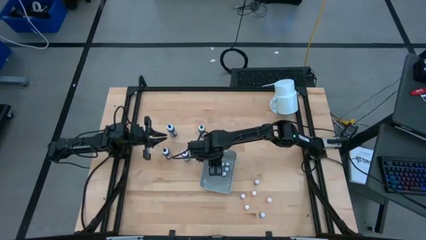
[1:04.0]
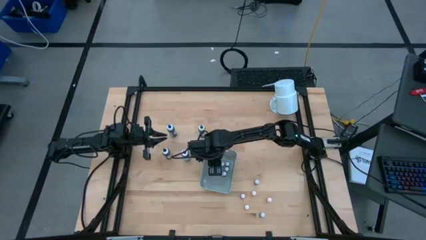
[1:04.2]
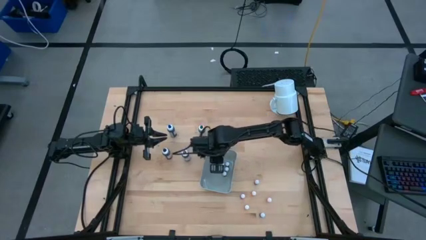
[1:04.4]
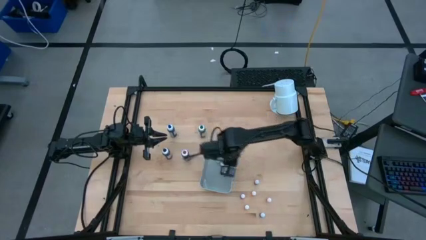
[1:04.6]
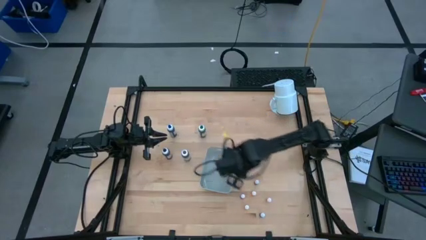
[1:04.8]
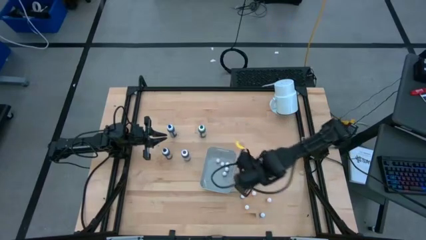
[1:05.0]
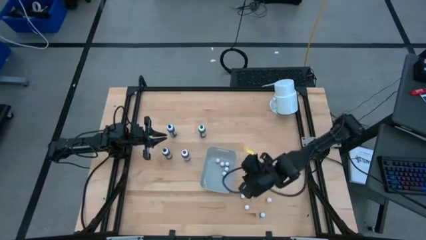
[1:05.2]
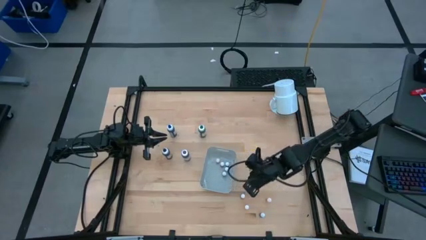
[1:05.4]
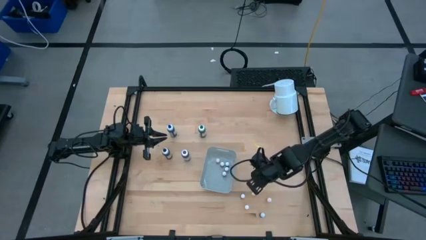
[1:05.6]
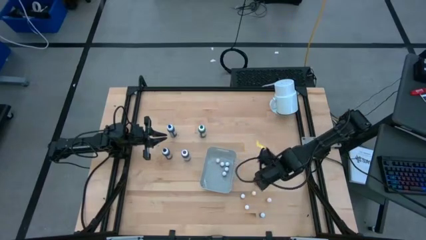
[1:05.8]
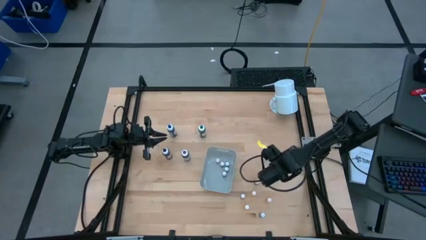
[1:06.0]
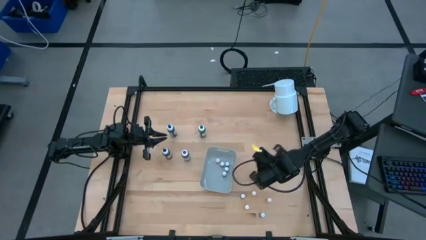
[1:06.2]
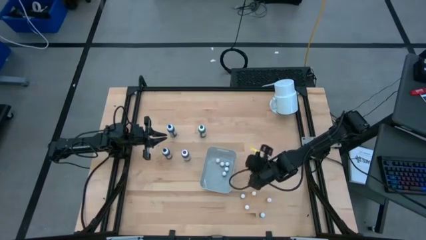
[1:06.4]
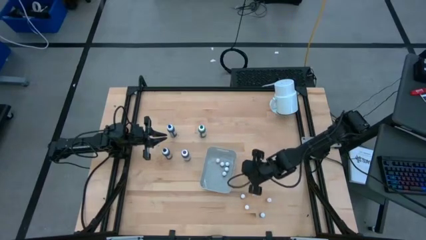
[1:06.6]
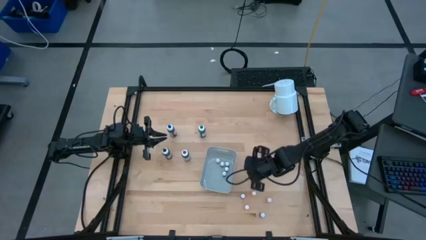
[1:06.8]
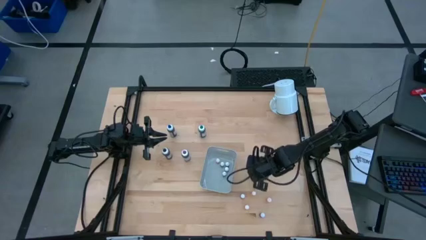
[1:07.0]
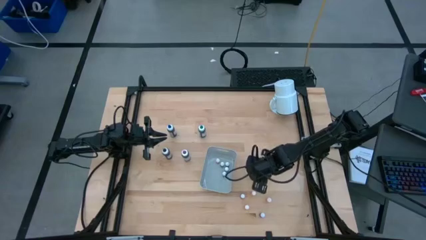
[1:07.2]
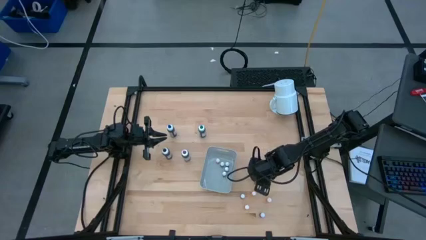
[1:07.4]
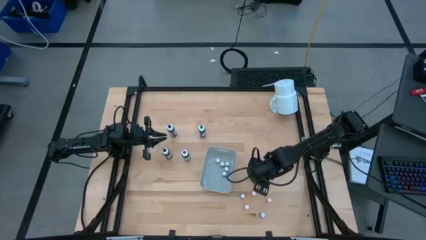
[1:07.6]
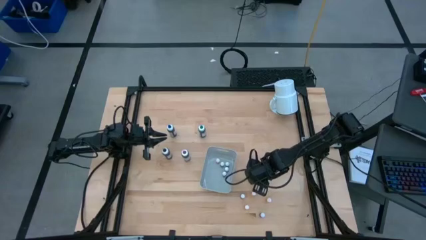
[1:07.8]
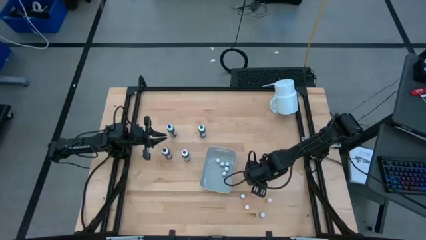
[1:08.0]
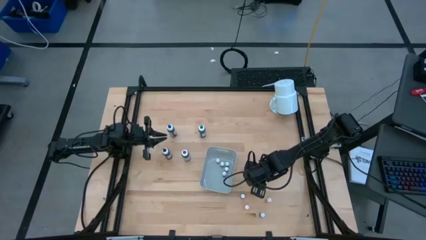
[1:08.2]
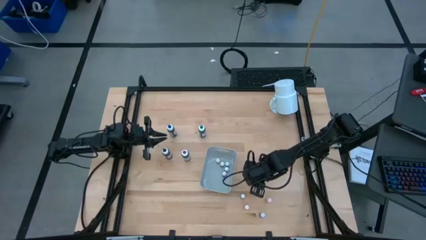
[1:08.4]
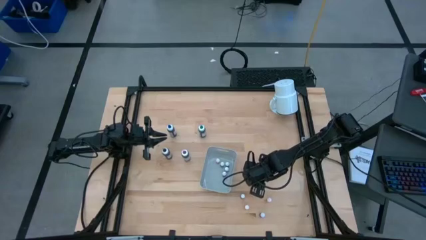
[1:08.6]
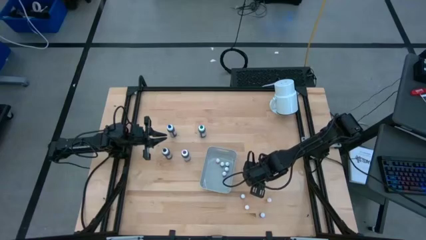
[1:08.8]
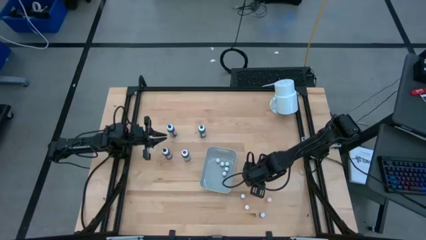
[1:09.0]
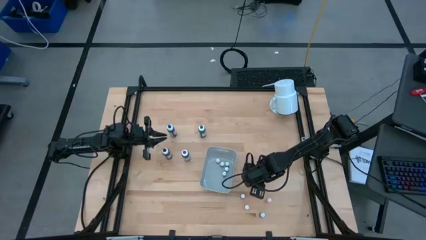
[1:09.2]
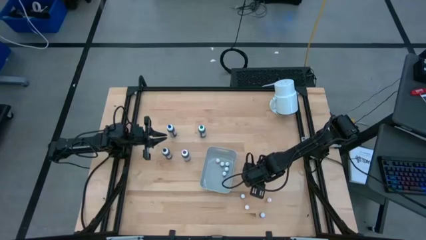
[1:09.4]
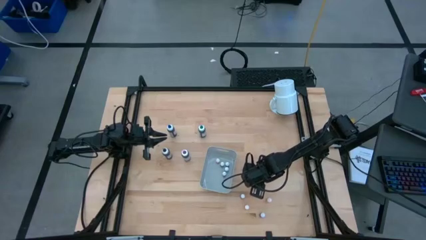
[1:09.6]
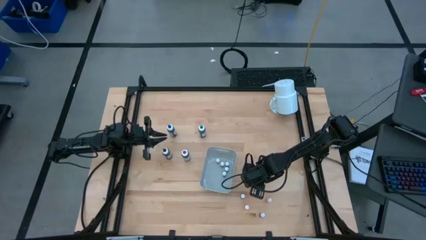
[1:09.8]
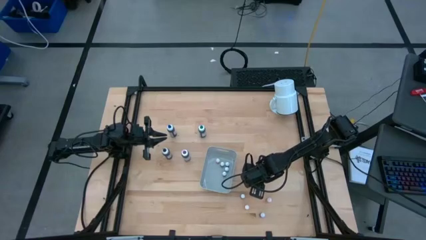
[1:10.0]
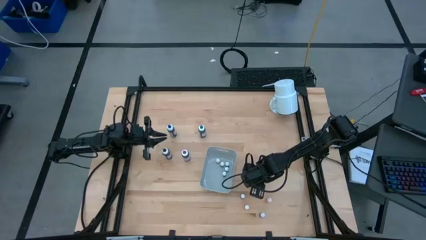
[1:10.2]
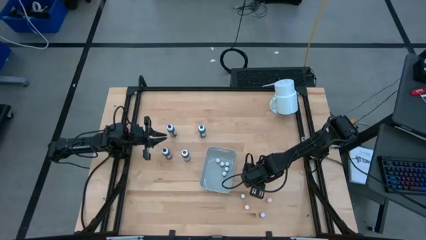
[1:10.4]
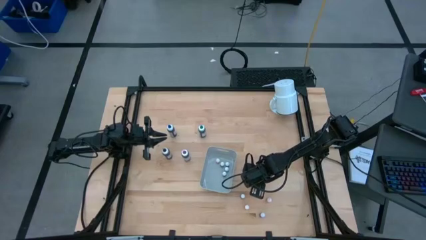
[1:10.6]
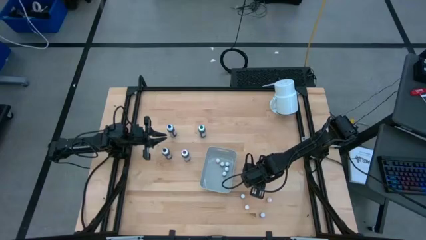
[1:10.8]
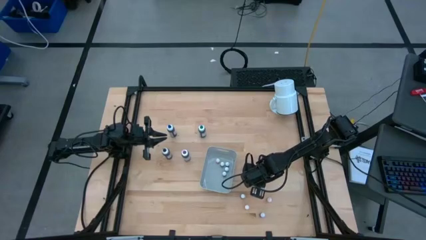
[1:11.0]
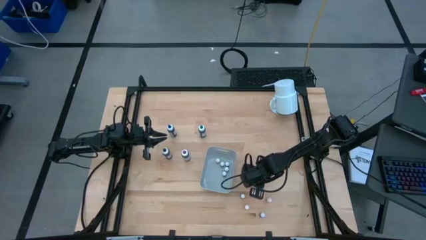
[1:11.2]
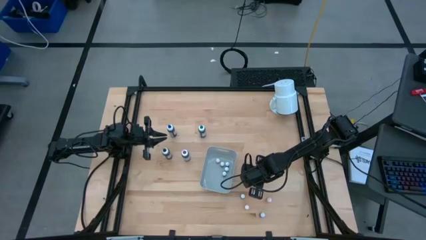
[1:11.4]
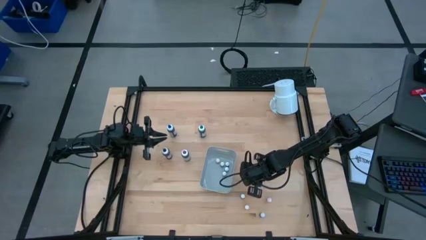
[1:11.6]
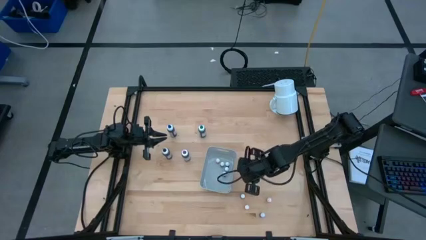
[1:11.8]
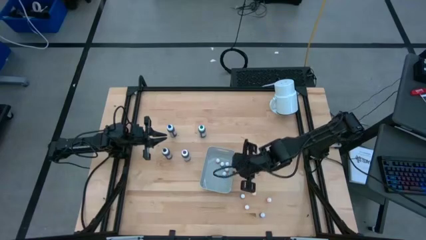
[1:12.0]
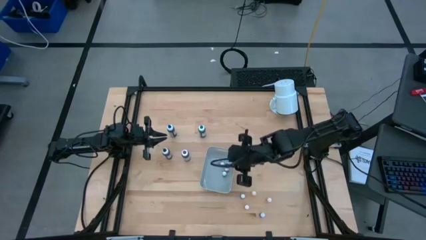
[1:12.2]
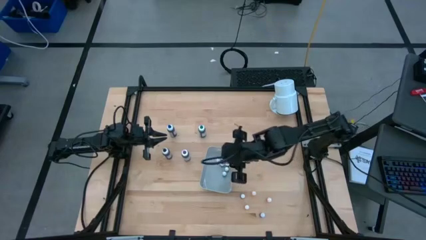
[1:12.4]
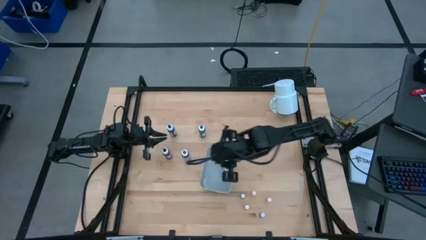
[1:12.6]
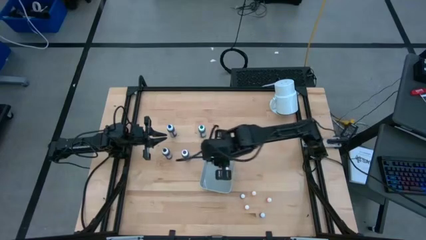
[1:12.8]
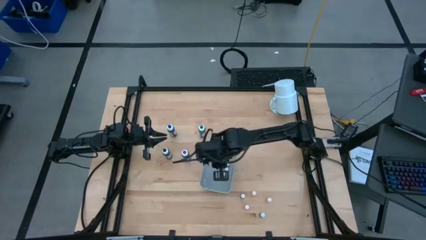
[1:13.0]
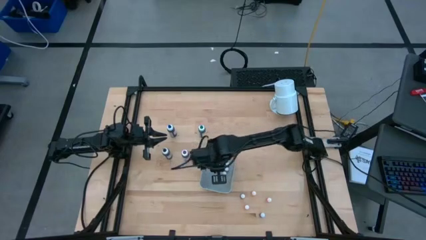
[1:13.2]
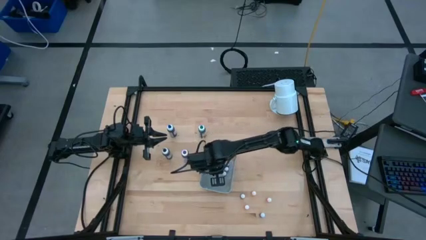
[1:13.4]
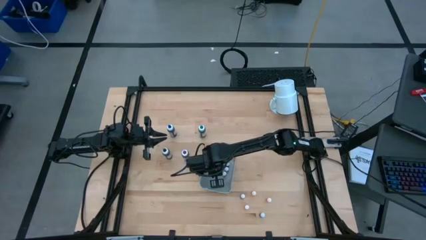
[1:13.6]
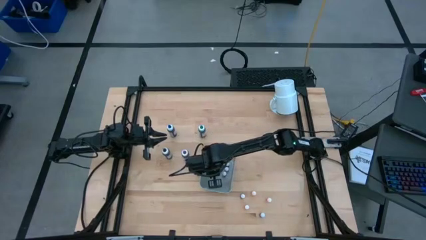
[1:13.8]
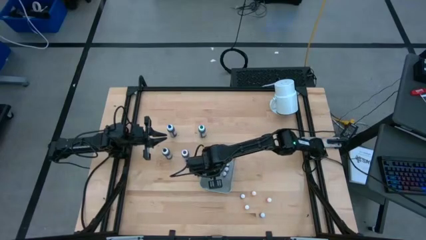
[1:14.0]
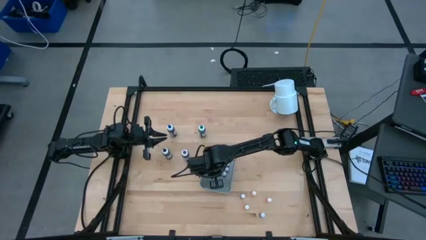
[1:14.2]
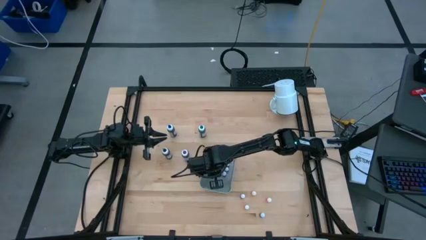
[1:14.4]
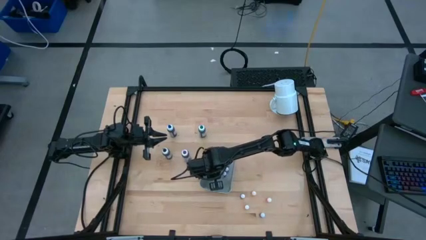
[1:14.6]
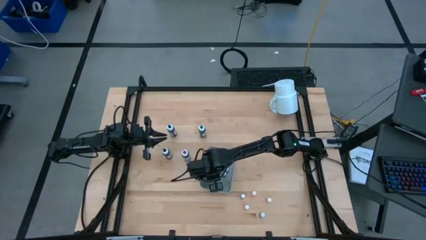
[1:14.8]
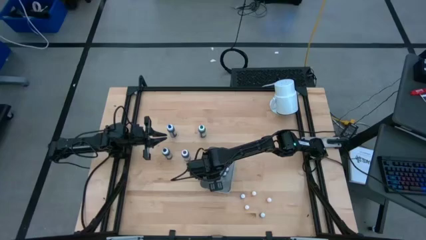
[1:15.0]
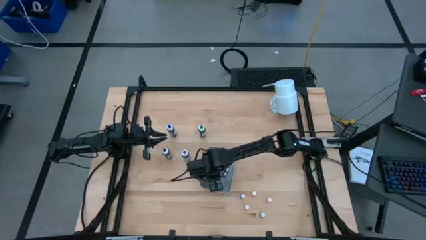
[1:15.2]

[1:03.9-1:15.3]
Task: Pick & Place food coloring
Put the small blue food coloring bottle into the white bin

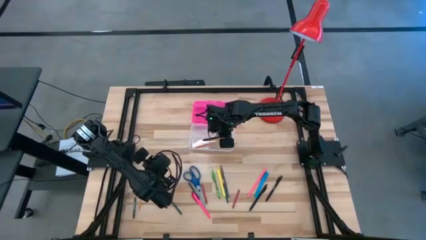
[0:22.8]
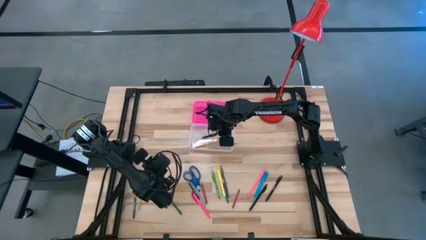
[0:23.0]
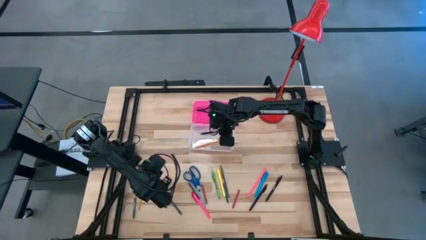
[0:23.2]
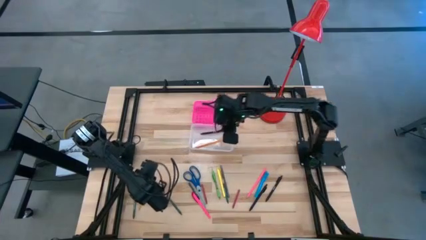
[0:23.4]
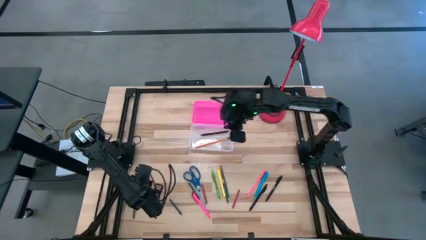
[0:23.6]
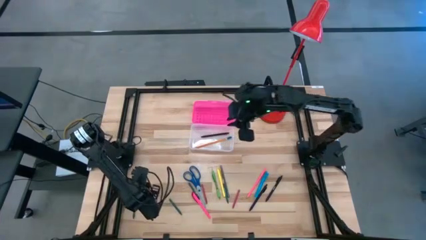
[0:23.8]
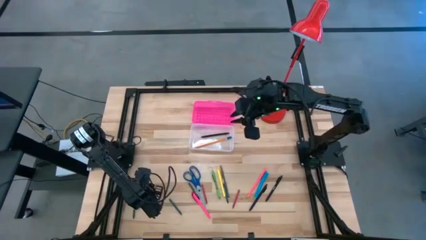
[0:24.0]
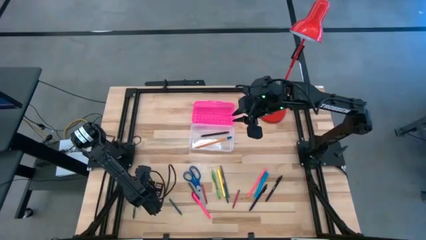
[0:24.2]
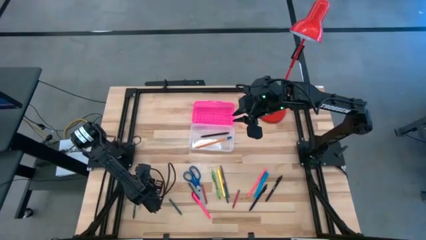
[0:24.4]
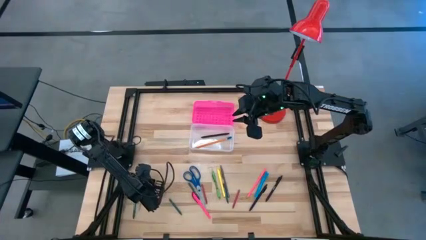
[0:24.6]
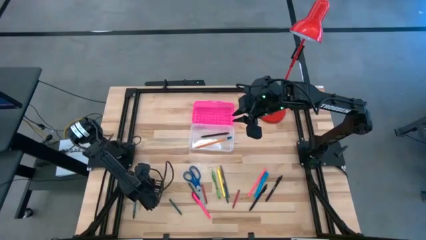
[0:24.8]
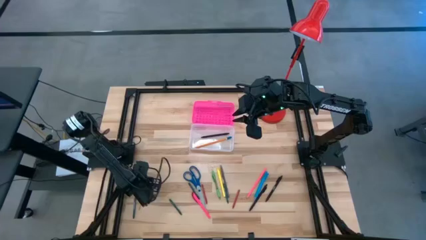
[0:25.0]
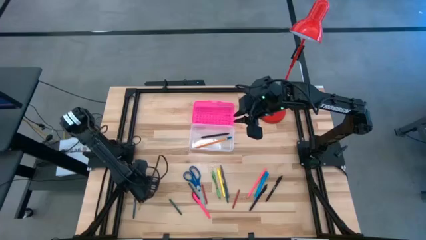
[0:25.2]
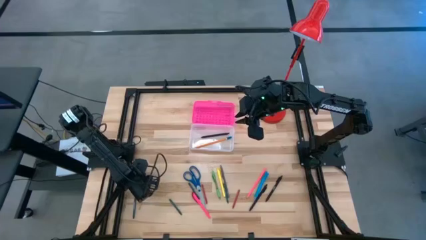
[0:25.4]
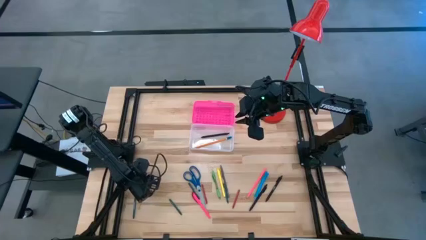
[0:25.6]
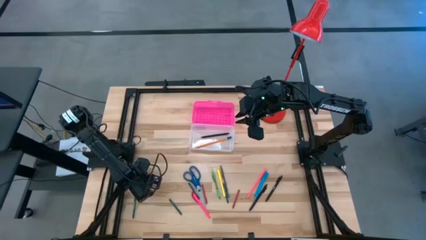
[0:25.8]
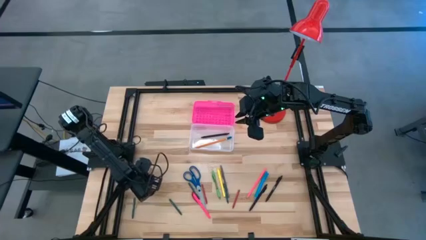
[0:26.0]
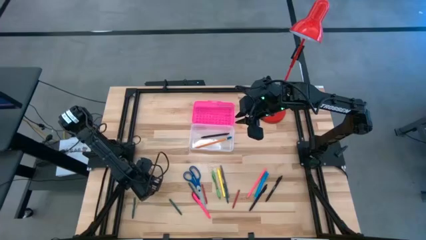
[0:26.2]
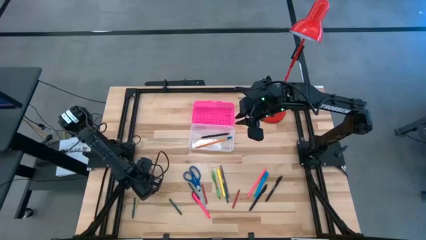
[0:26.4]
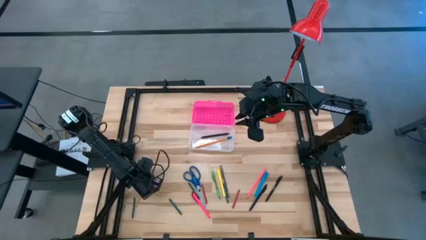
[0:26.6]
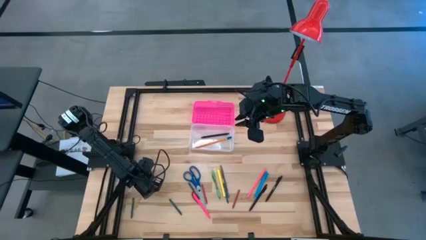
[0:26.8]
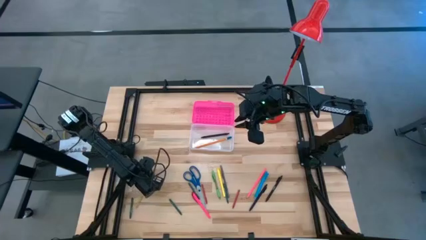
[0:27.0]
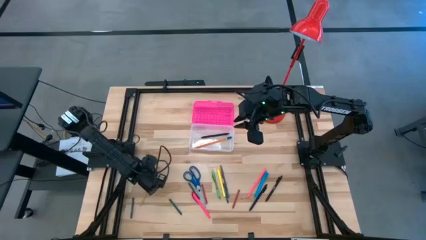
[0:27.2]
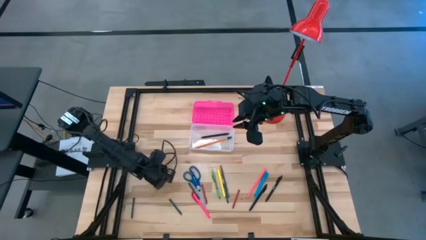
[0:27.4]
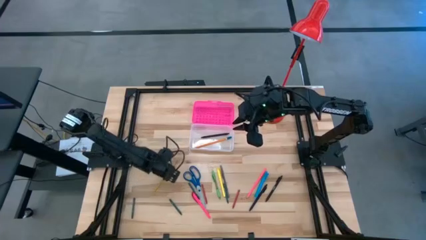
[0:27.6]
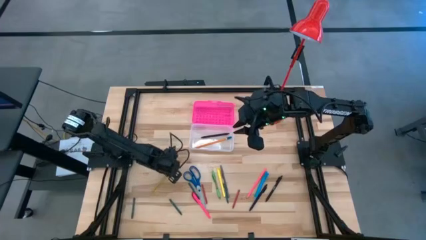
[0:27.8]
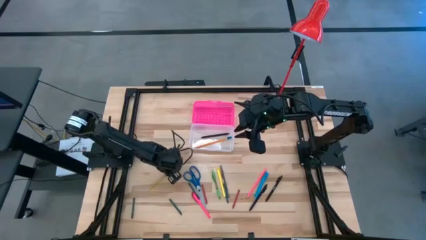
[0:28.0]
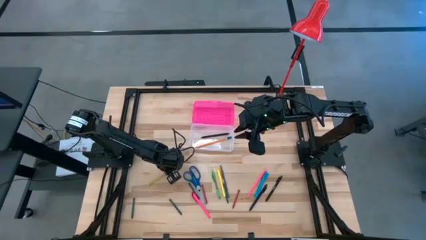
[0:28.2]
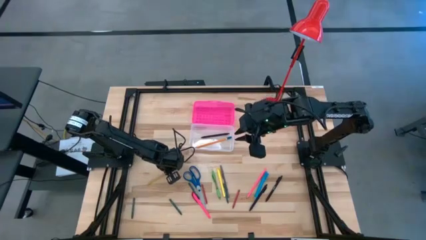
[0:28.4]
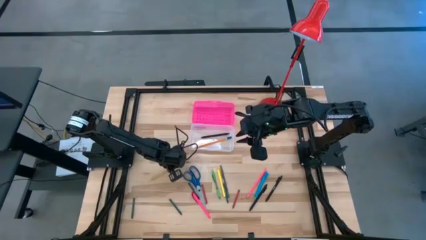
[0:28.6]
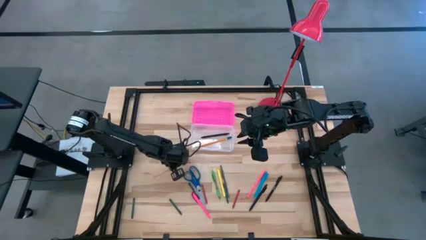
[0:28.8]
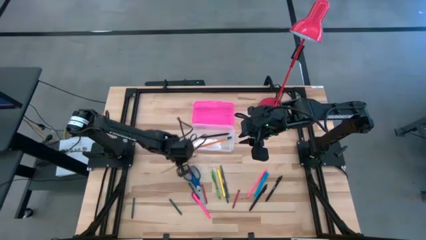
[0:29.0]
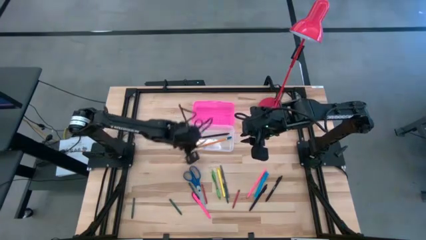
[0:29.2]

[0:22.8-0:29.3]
Task: Pick & place school supplies into a supply box
Put the yellow pencil into the pink supply box
